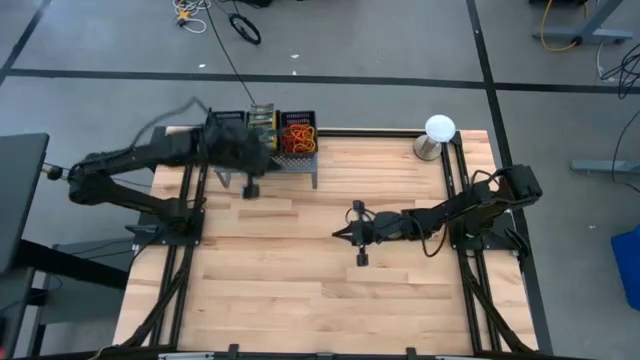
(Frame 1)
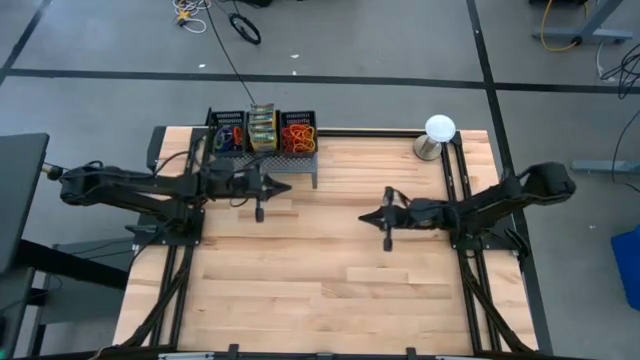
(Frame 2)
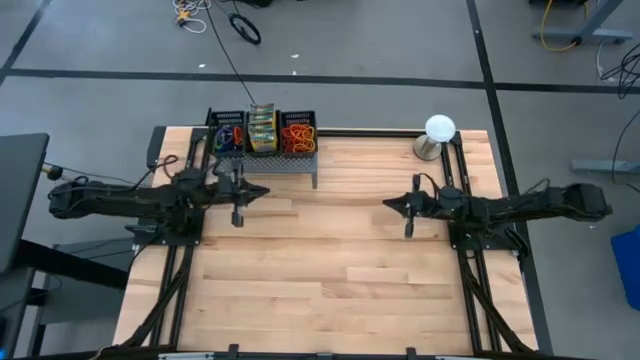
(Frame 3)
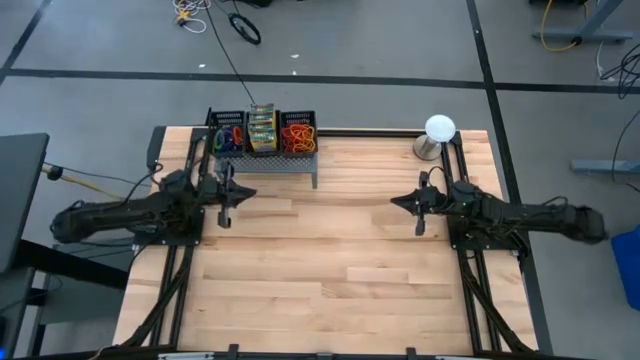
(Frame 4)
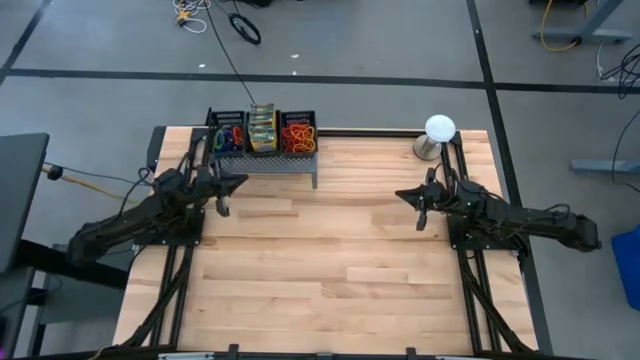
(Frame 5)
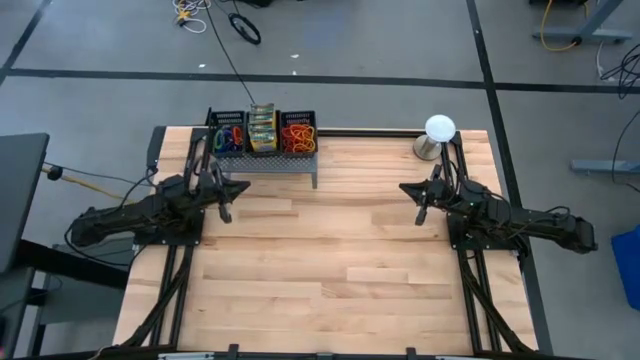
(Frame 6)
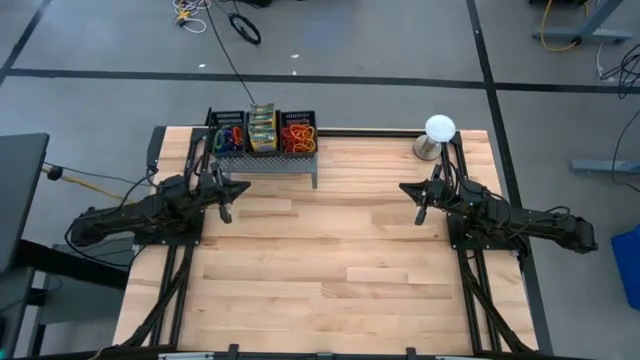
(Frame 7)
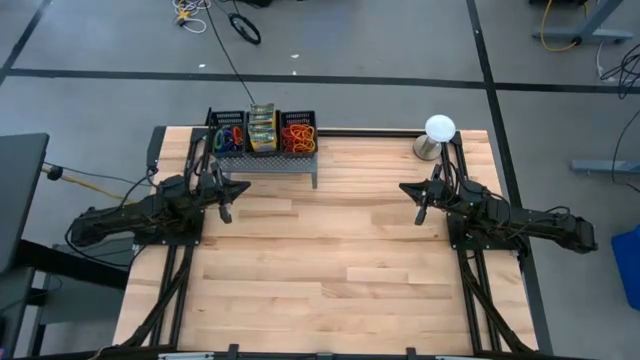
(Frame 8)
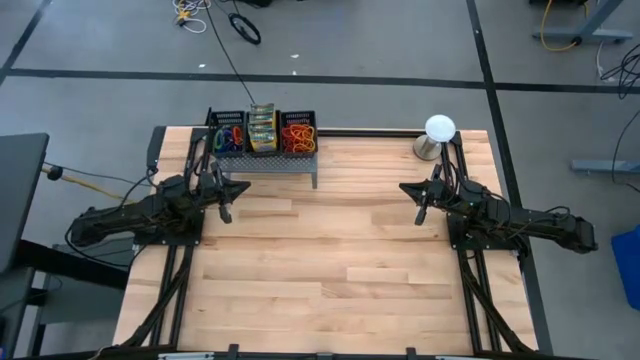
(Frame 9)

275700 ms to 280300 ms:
Task: Pick & Place Office Desk Supplies
Return to Home Position

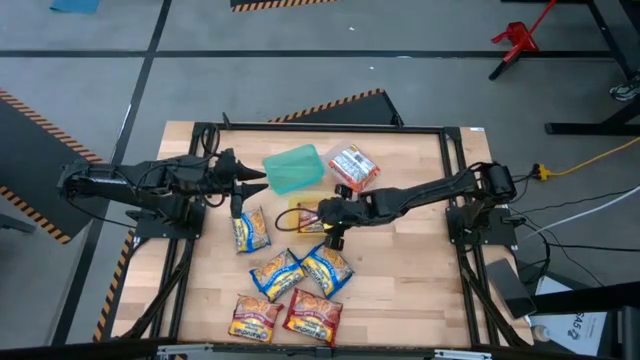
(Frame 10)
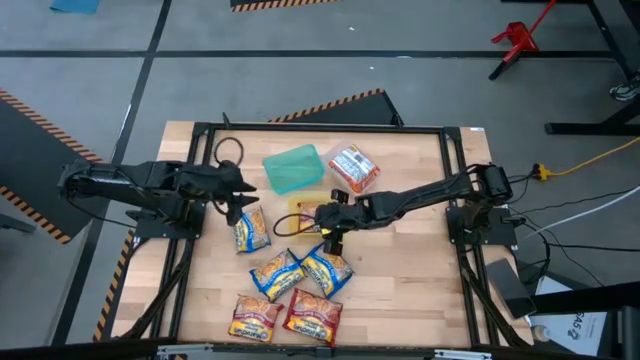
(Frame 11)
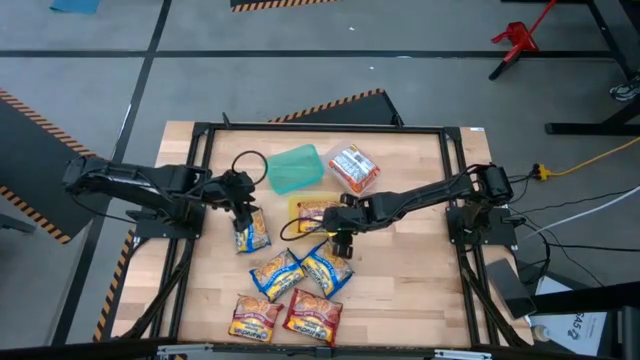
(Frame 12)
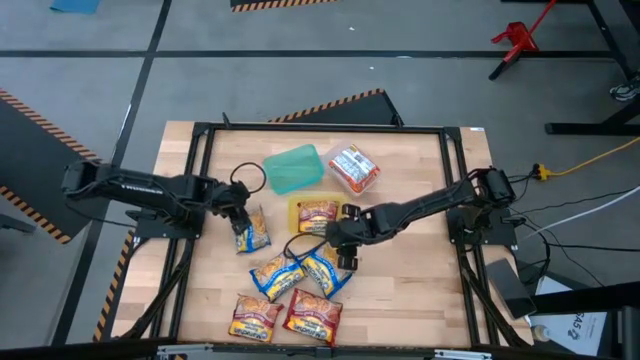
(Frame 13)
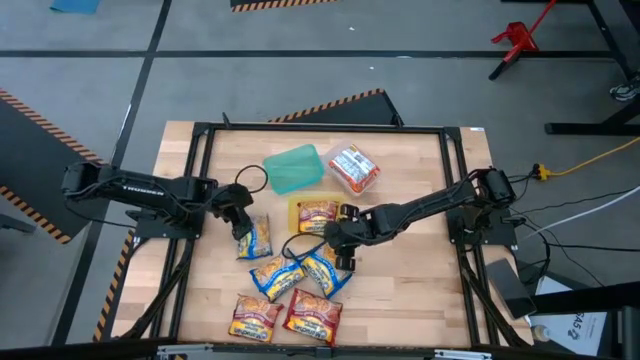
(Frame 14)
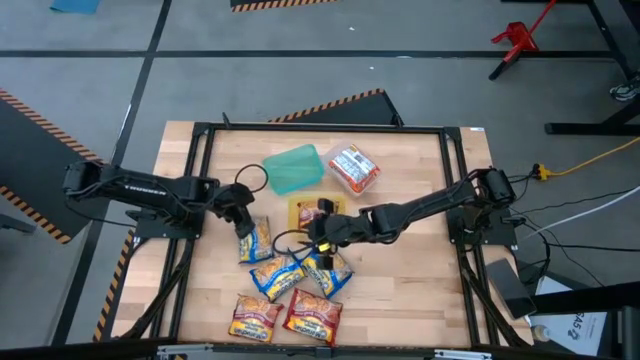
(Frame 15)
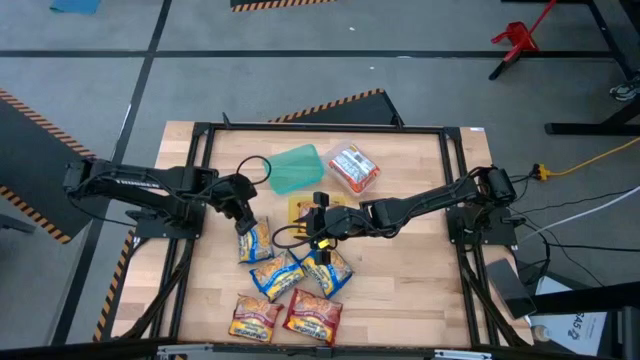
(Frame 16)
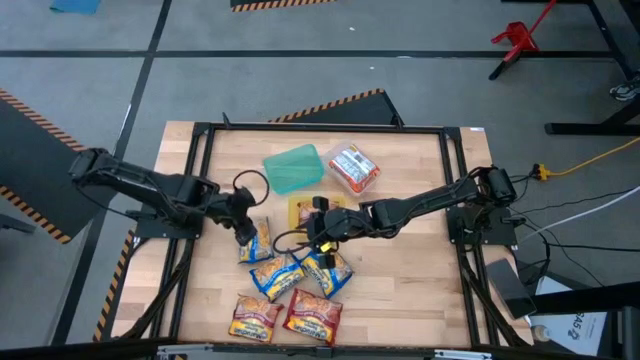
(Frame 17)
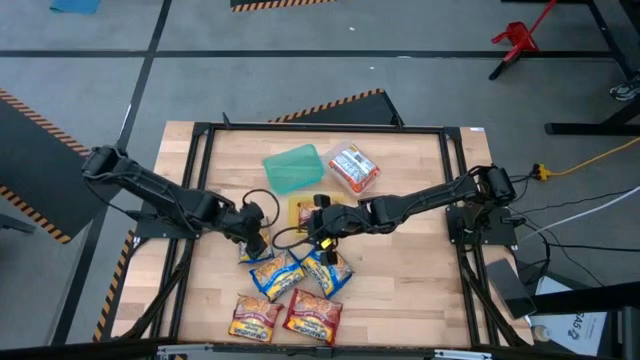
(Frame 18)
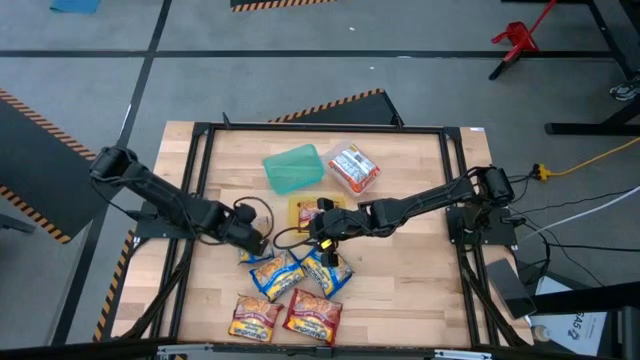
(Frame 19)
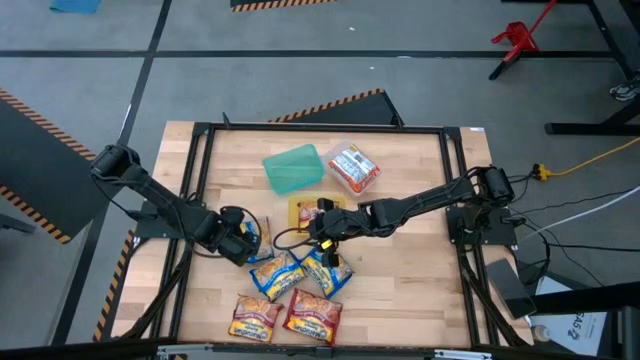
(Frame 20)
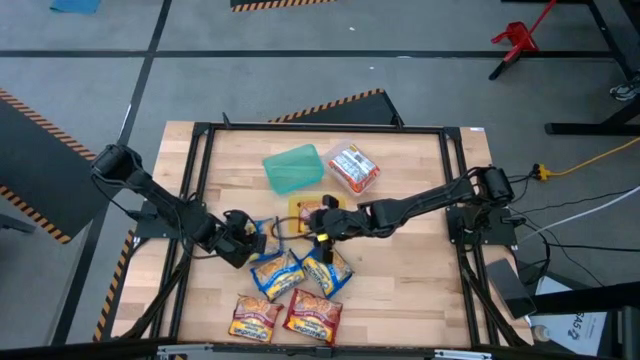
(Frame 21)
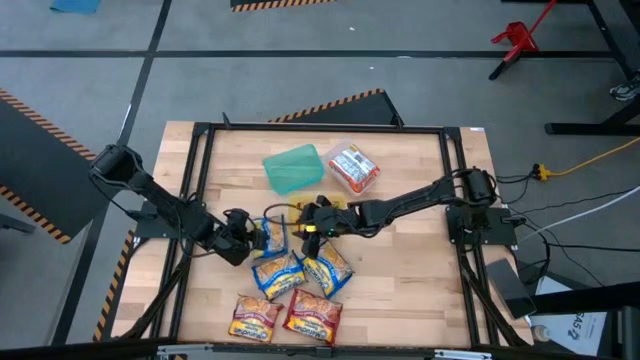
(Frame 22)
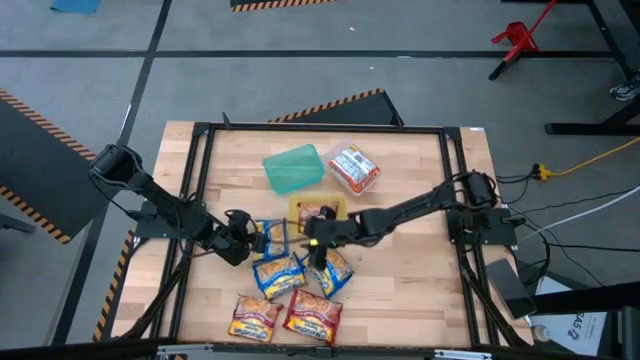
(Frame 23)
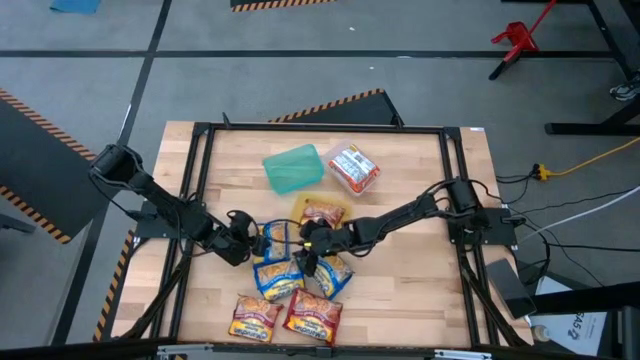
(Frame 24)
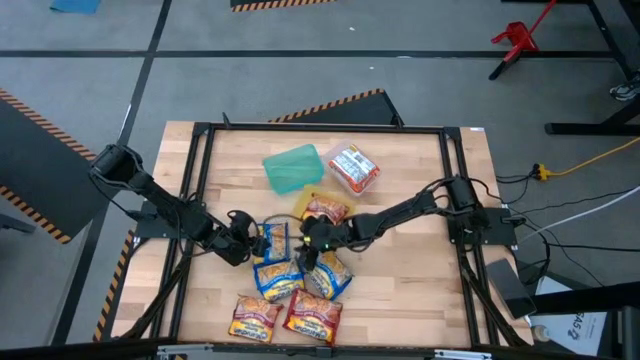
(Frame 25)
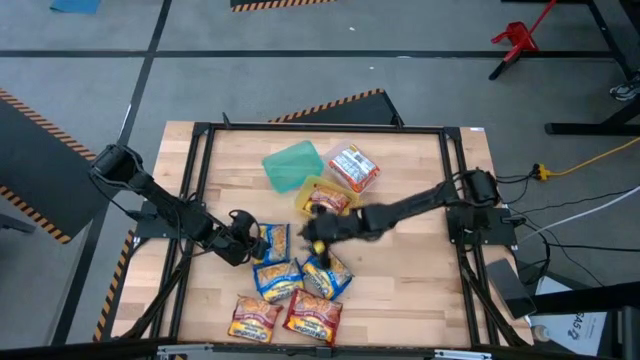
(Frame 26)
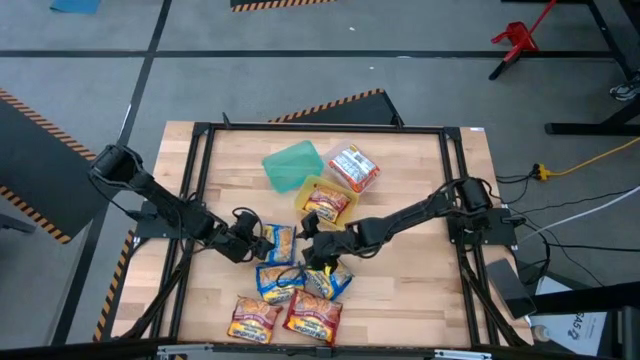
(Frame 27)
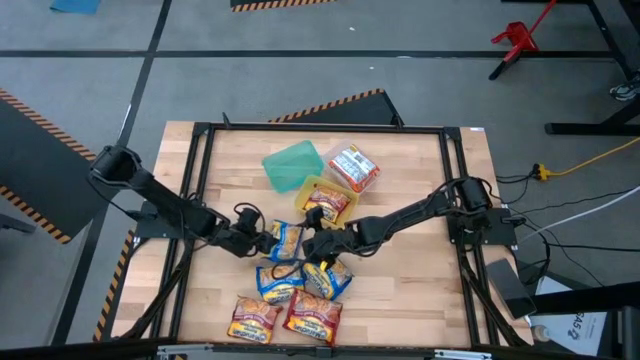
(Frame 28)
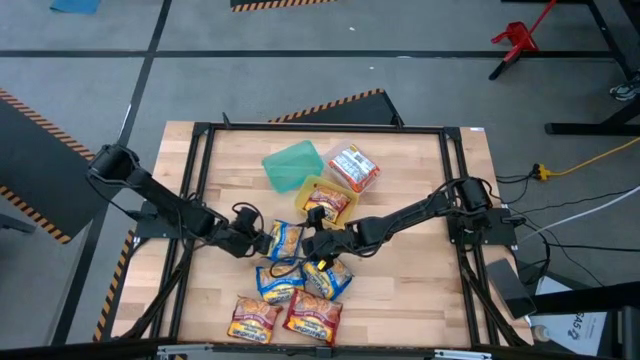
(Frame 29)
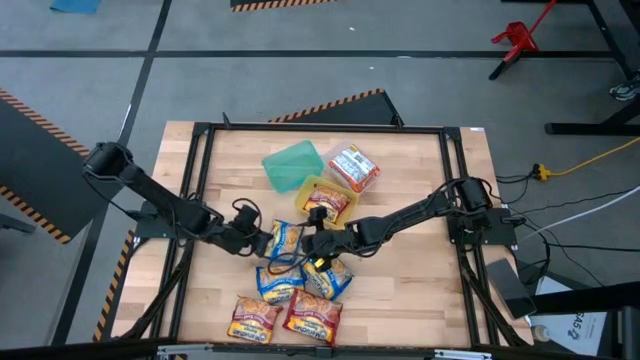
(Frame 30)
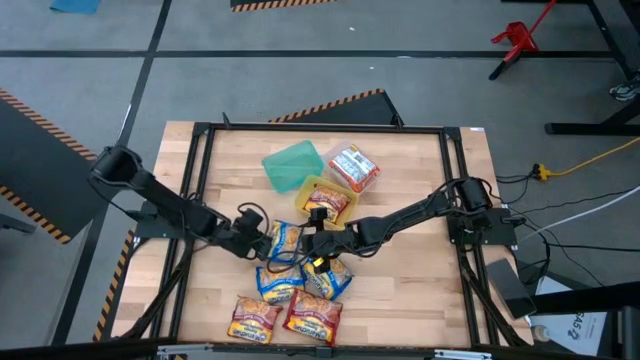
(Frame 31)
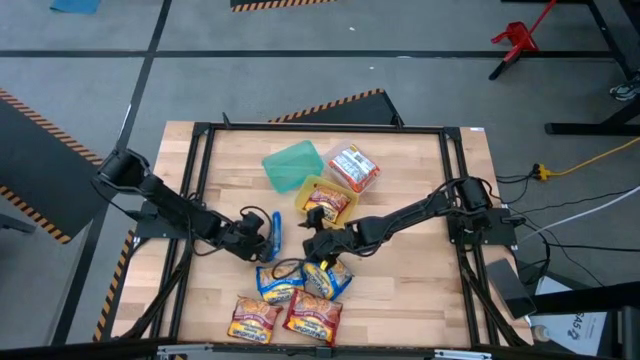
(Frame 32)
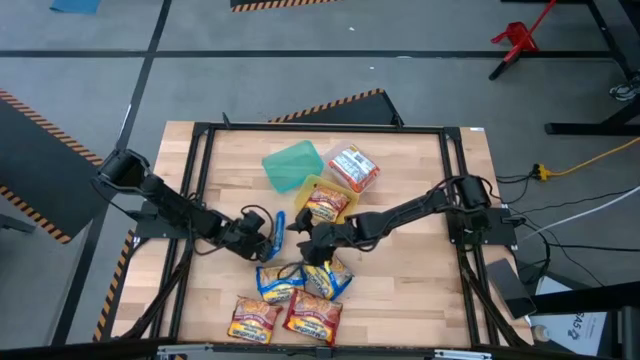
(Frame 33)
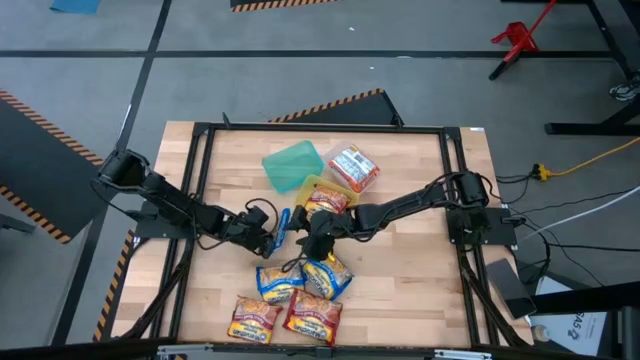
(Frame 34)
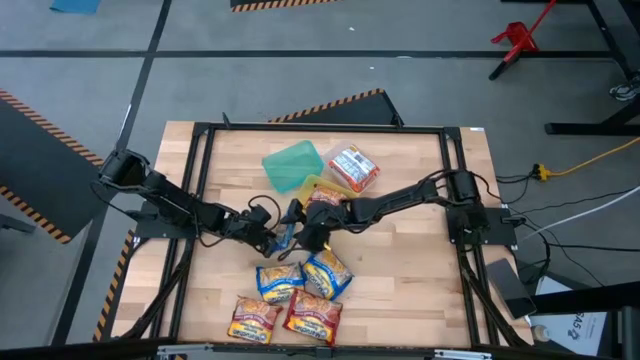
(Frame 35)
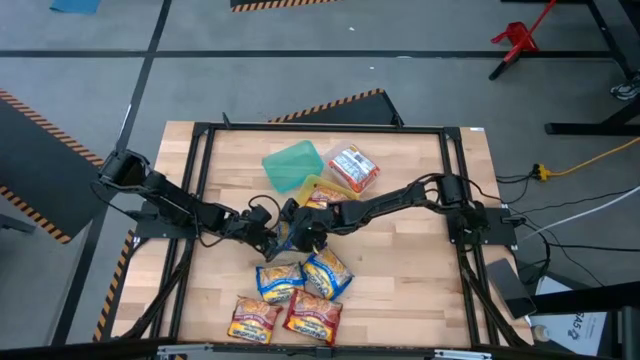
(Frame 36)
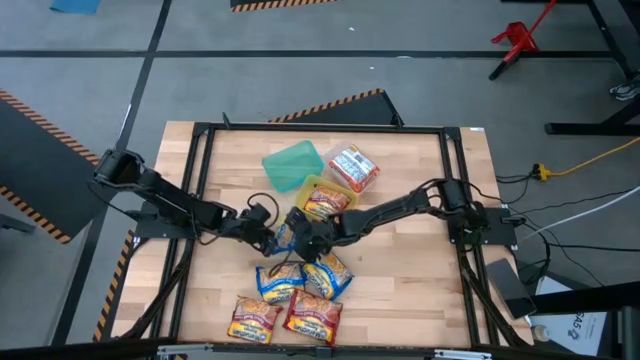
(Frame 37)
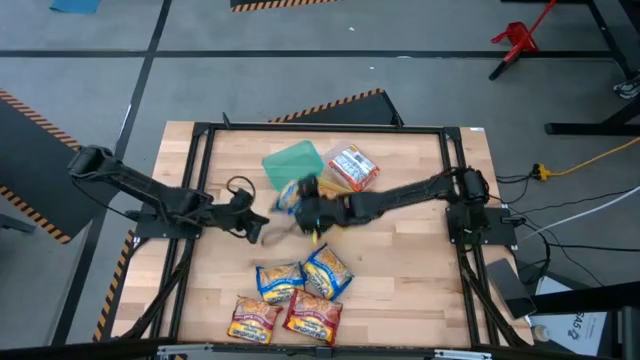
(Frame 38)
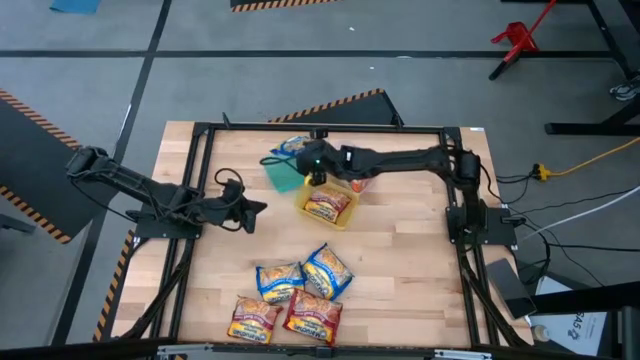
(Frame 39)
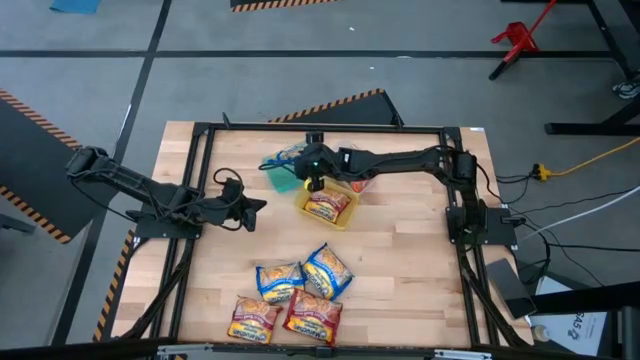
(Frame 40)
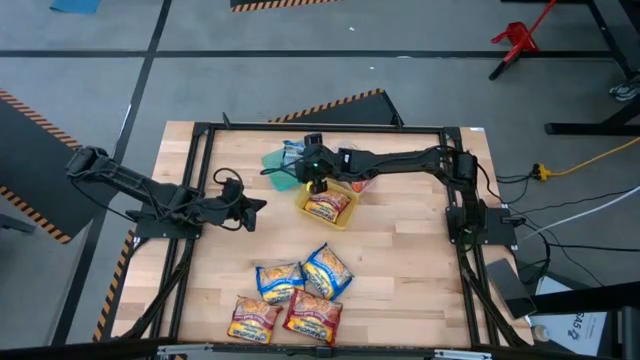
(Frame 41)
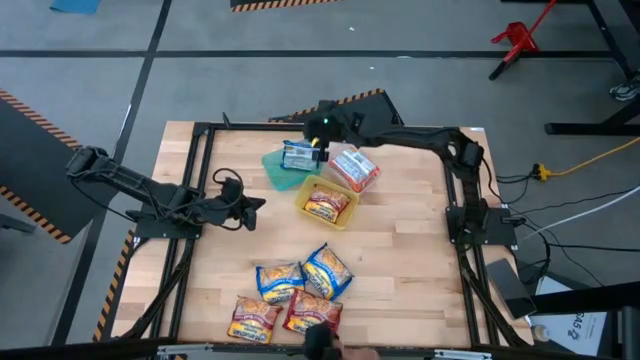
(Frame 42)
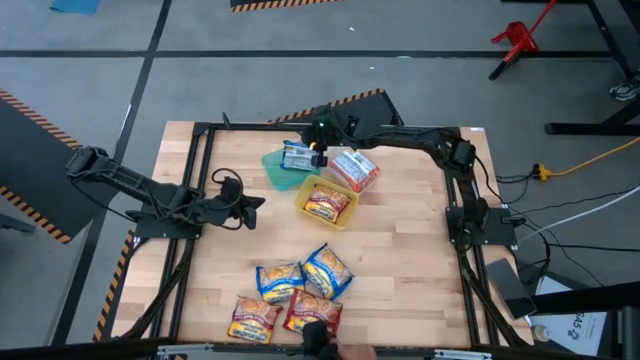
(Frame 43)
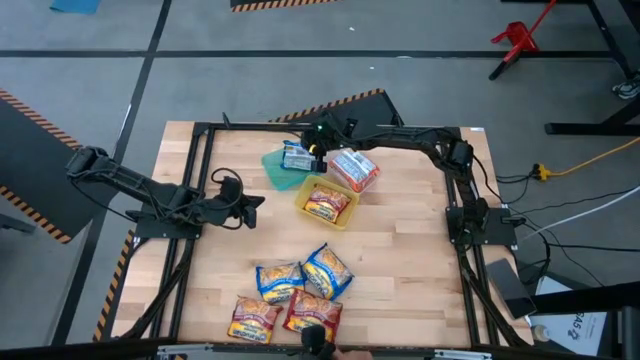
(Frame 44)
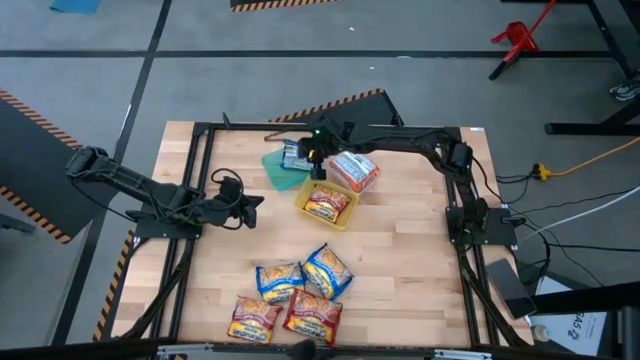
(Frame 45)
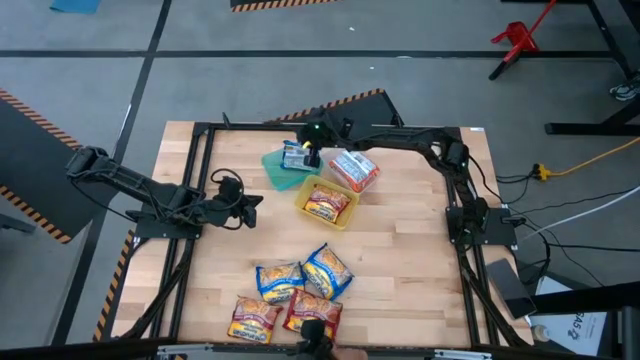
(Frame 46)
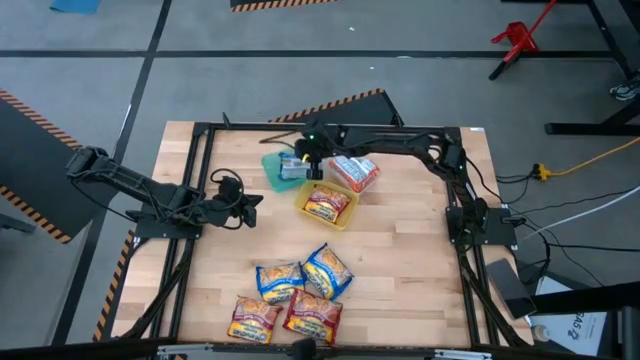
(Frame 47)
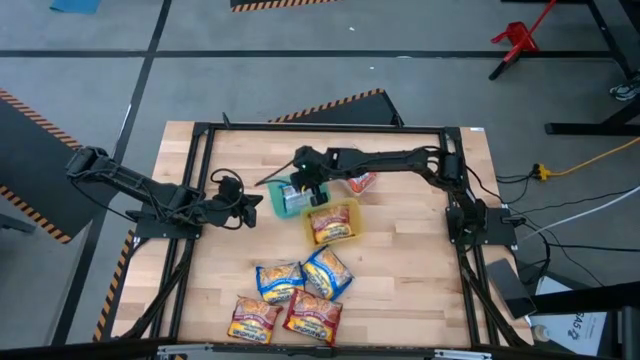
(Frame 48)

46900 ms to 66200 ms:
Task: Sort Maruchan noodles
Put the top left blue noodle pack into the green bin
